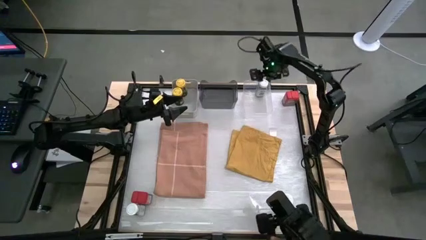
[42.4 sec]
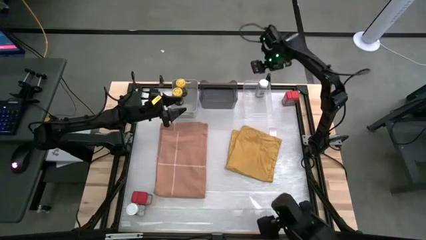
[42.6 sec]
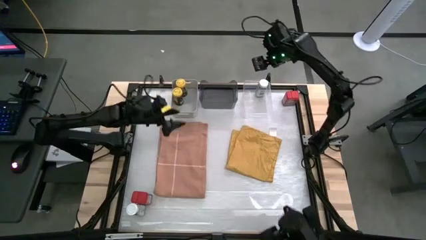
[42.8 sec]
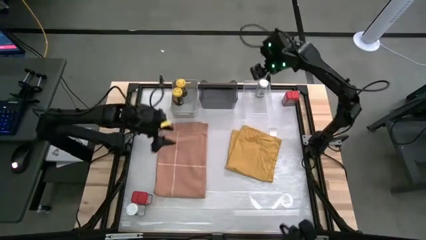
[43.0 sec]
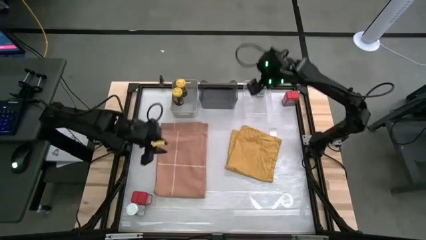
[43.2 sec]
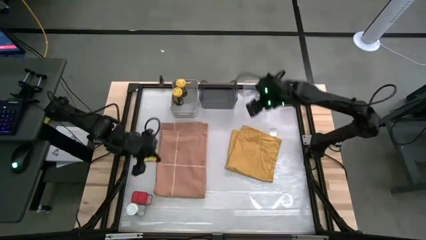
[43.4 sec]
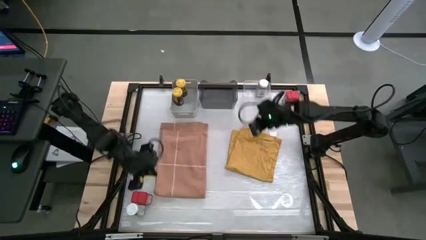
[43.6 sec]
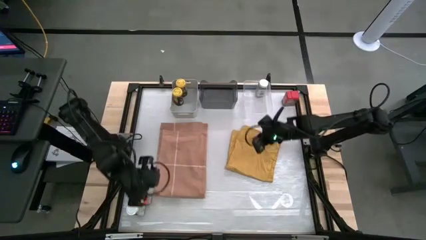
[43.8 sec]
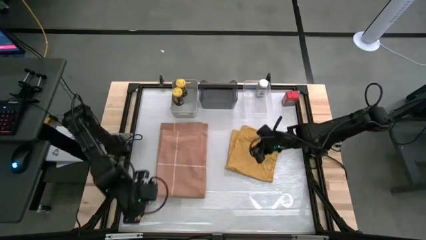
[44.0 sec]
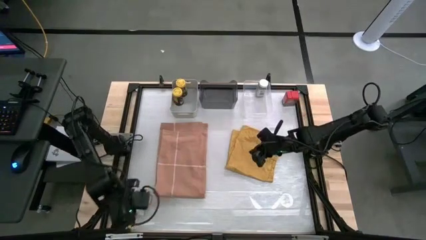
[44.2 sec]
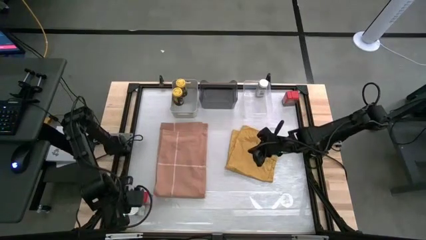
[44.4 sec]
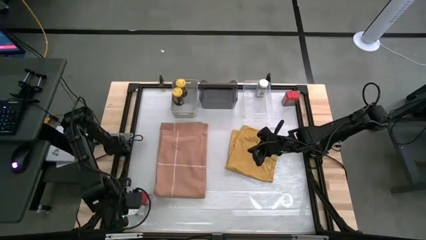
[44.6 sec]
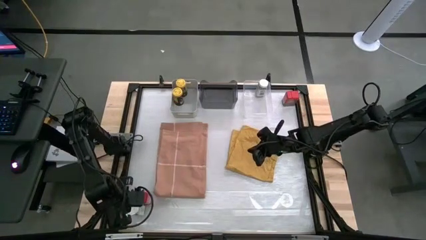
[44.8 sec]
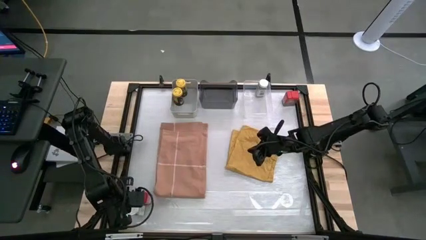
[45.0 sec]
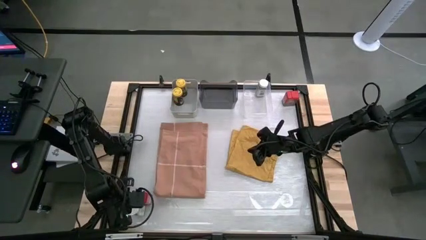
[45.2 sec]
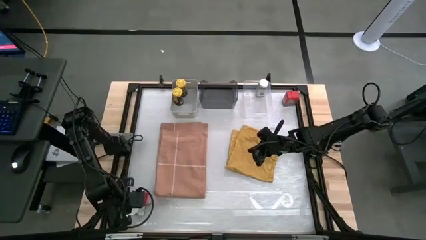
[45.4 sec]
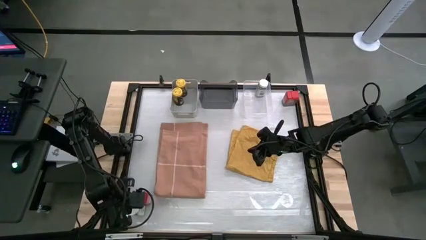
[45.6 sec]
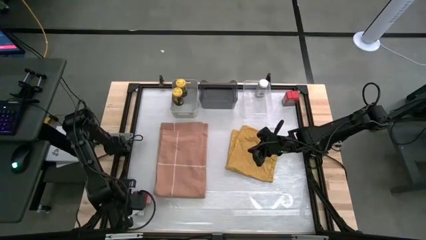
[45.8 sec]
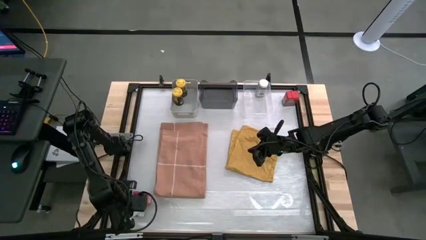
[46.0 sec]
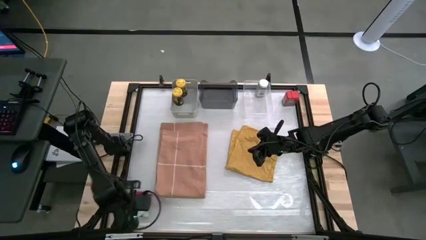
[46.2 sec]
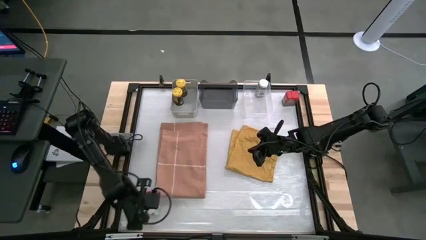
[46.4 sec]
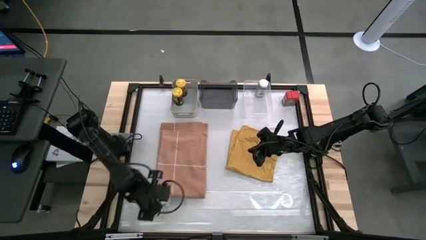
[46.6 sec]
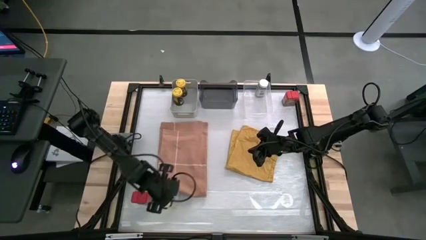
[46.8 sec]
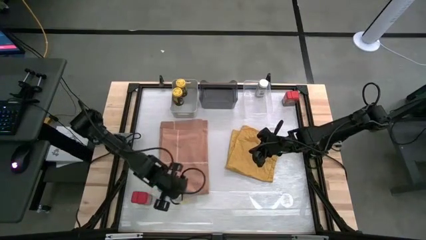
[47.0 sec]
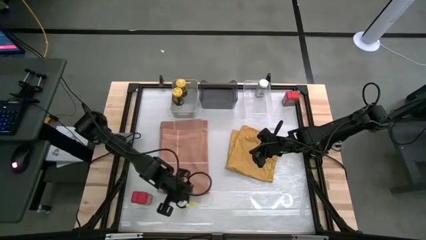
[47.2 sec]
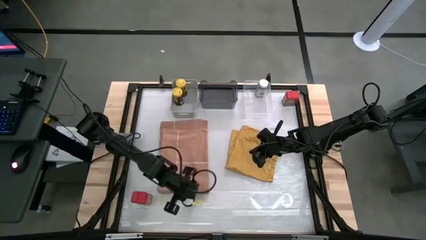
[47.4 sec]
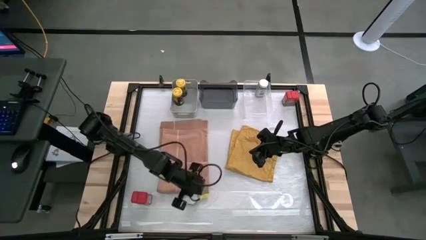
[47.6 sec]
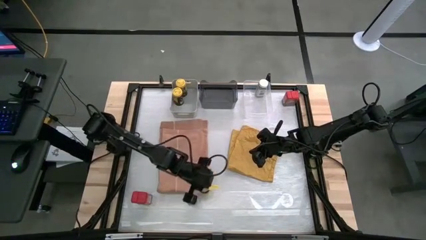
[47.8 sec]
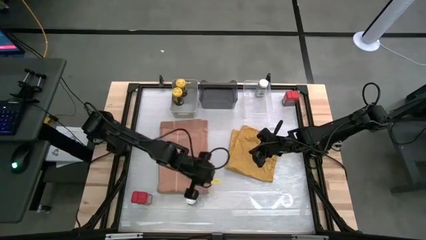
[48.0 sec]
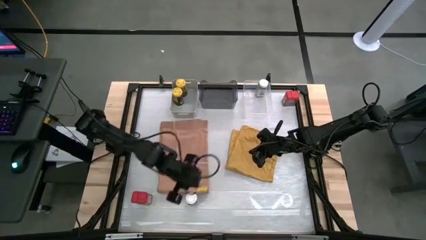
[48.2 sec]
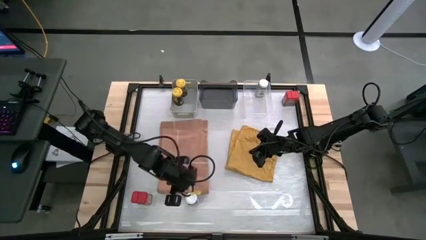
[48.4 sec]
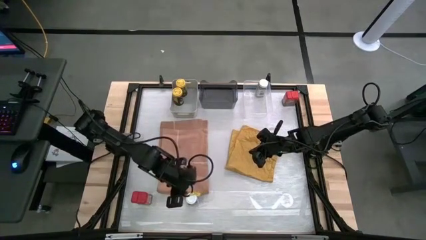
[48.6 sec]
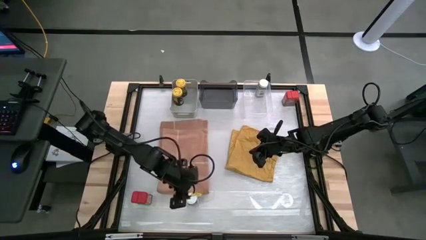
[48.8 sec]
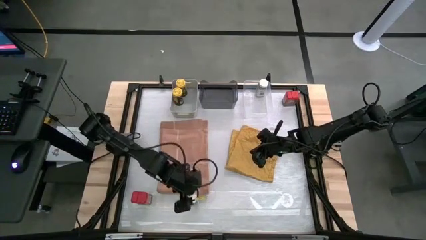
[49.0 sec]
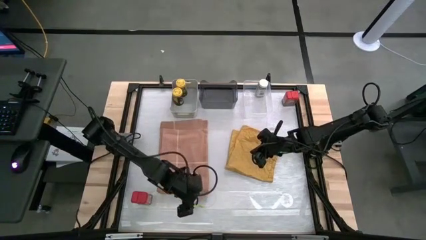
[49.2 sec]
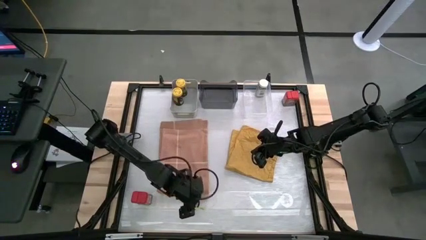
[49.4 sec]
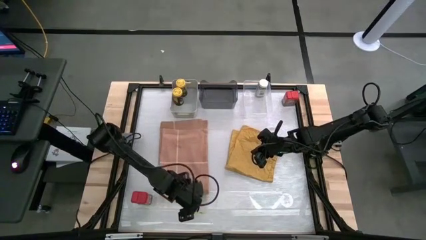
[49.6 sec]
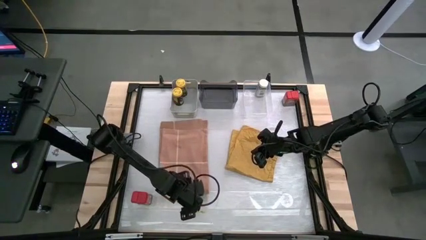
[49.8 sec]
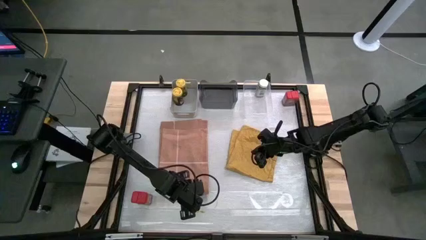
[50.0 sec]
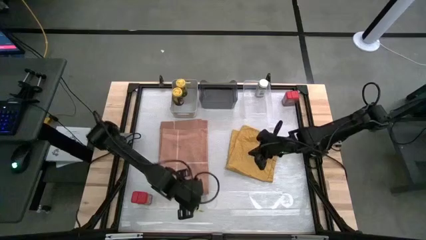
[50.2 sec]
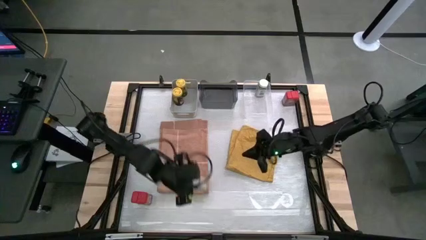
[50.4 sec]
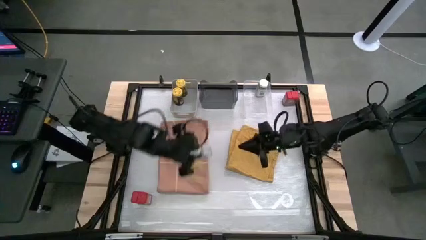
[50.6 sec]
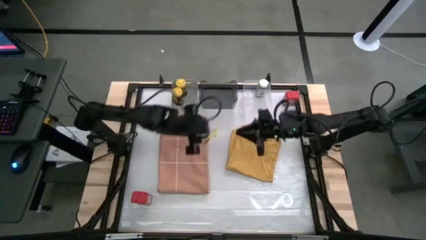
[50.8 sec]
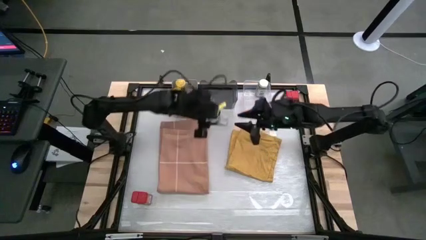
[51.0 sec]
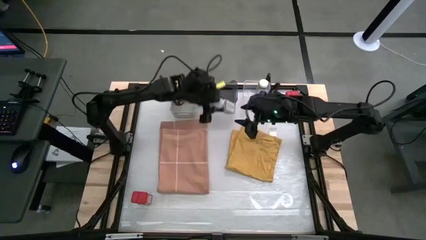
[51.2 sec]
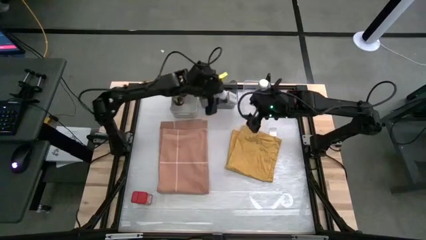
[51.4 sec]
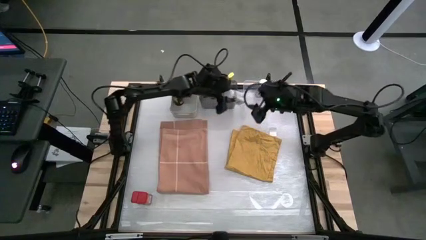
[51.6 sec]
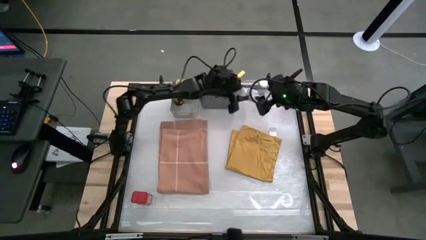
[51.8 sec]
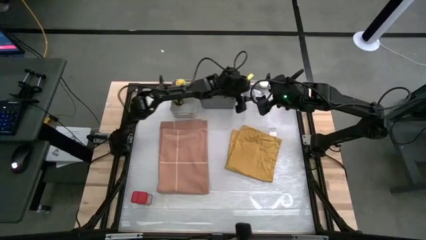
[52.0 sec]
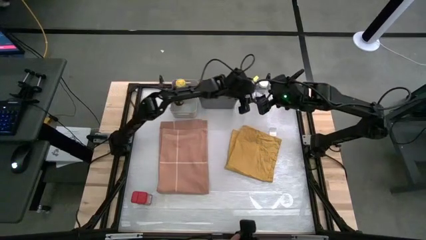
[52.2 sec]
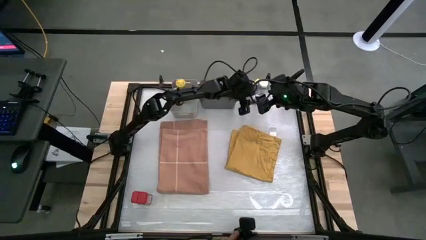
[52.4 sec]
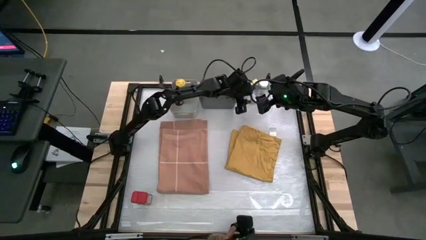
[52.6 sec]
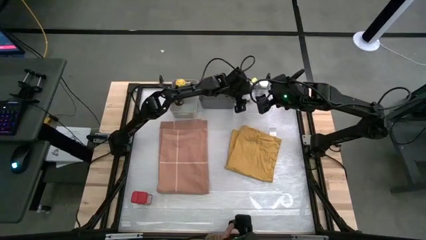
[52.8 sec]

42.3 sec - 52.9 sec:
Task: Sort spices by type
Put the white seasoning bottle into the transparent bin

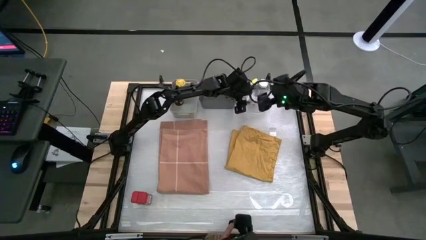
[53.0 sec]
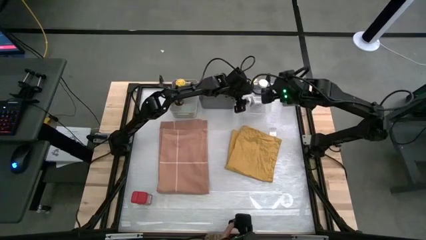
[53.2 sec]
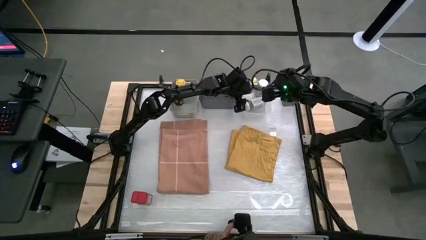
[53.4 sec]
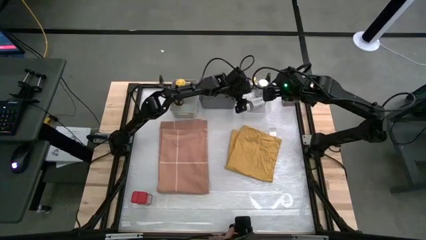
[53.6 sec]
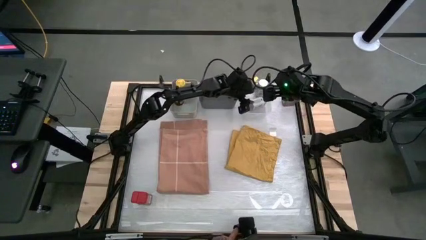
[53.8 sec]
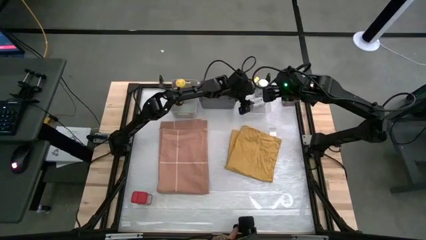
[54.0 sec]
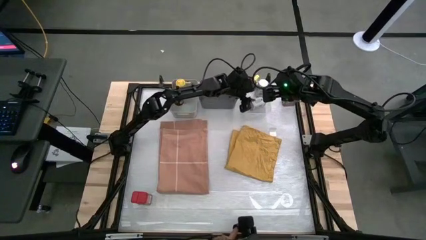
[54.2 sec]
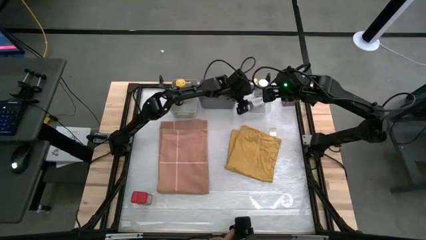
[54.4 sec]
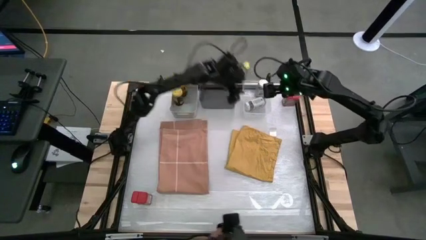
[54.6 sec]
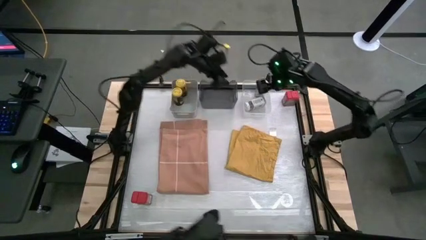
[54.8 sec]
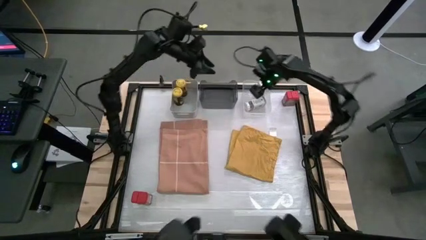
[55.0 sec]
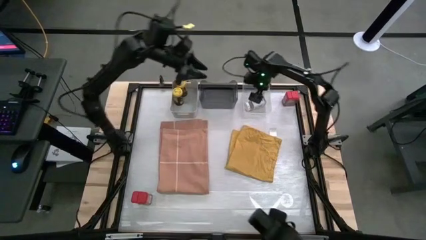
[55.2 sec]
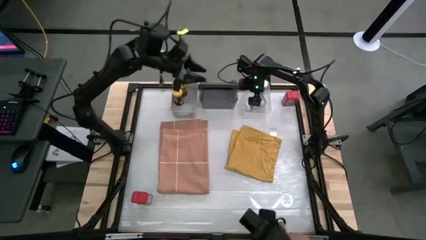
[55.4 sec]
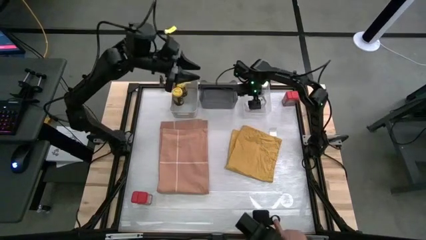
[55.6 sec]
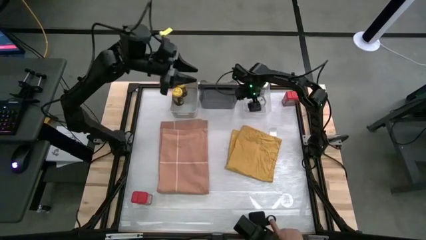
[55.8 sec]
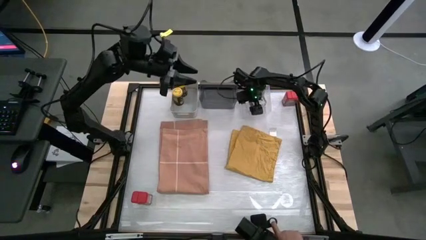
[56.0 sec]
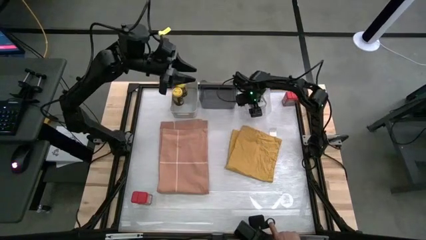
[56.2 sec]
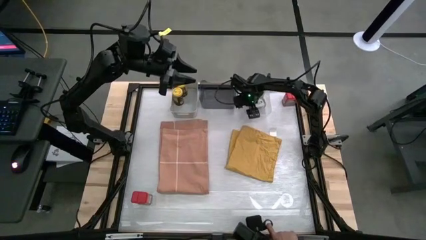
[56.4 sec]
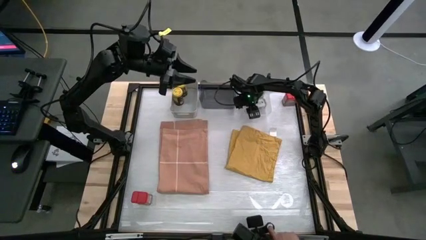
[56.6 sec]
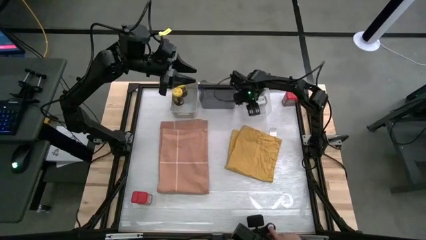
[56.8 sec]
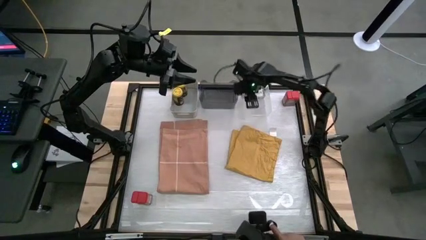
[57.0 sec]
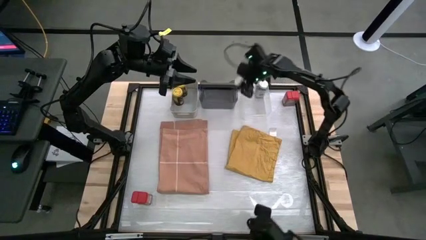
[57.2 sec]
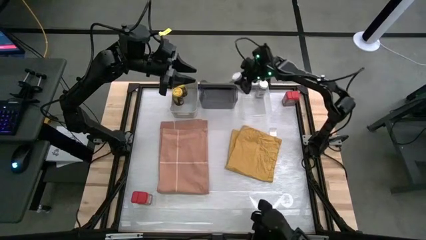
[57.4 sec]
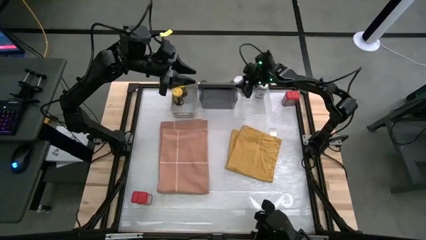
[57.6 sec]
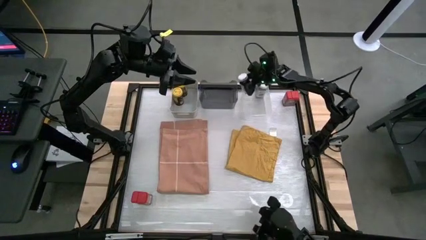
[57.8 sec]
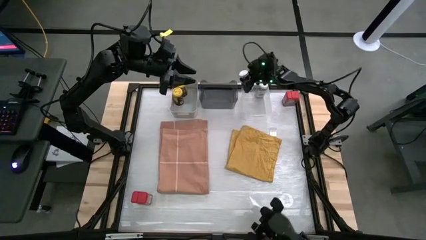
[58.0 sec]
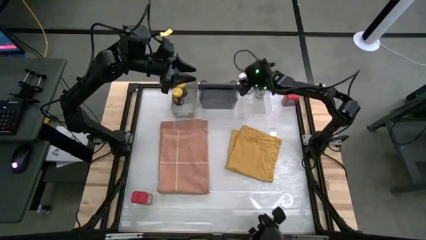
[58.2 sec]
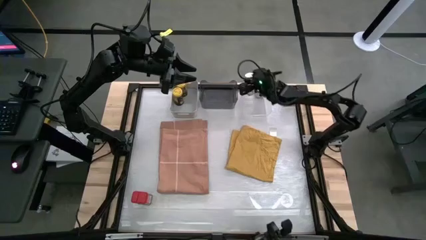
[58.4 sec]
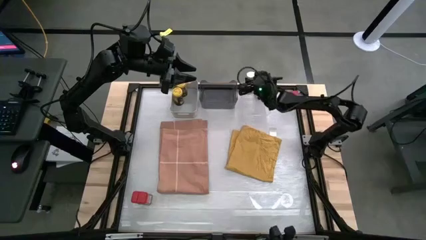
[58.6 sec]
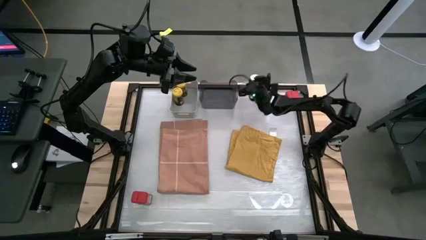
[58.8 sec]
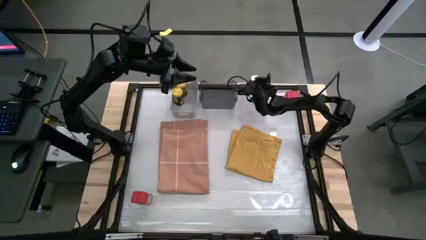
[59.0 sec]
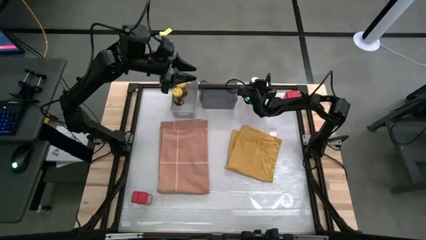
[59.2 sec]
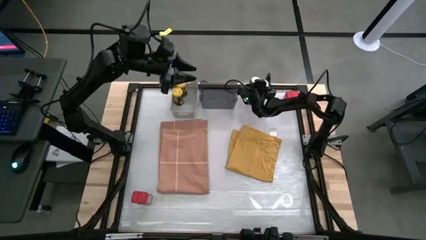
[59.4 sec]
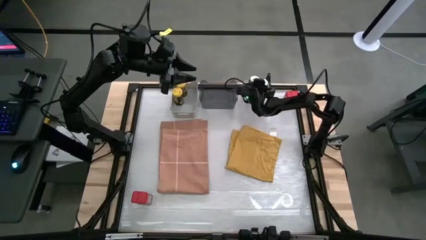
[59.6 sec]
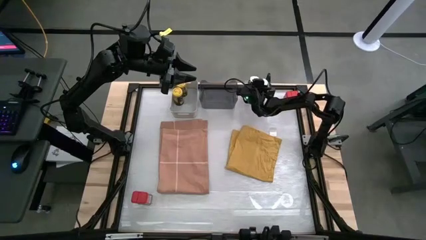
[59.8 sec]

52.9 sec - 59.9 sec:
Put the white seasoning bottle into the transparent bin
